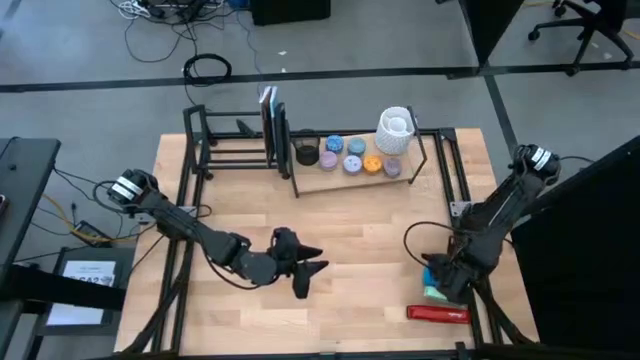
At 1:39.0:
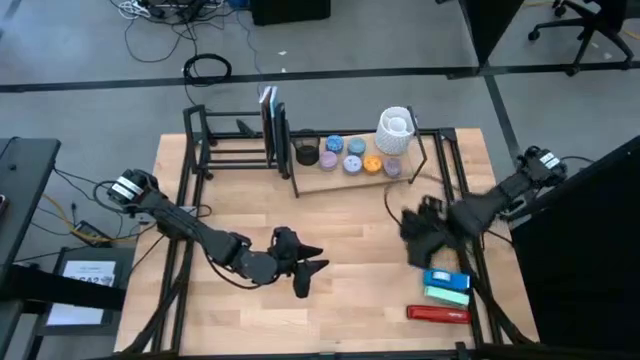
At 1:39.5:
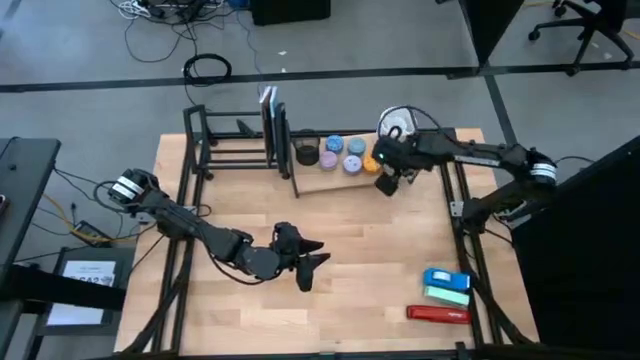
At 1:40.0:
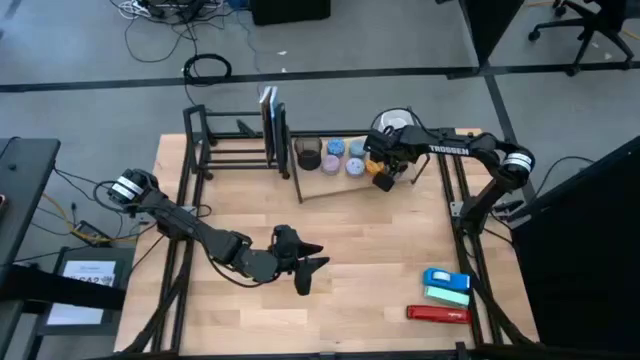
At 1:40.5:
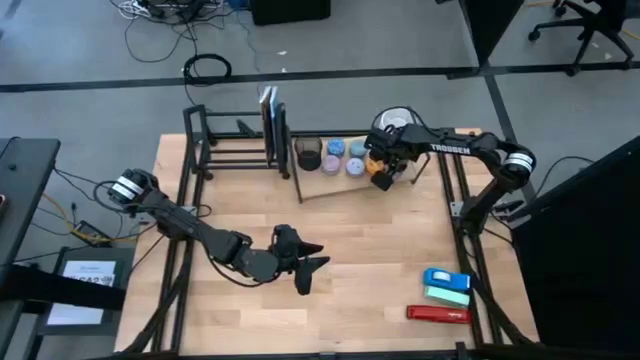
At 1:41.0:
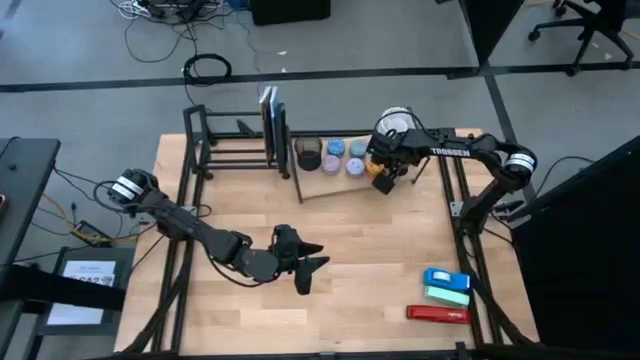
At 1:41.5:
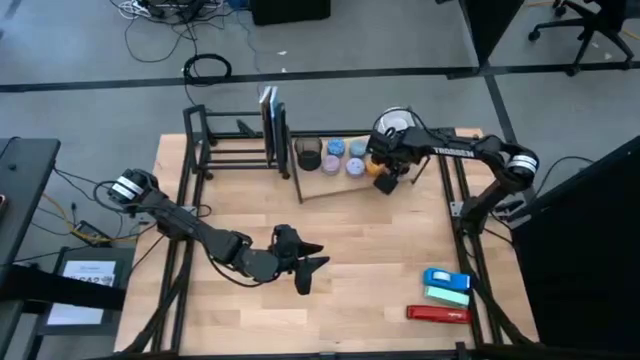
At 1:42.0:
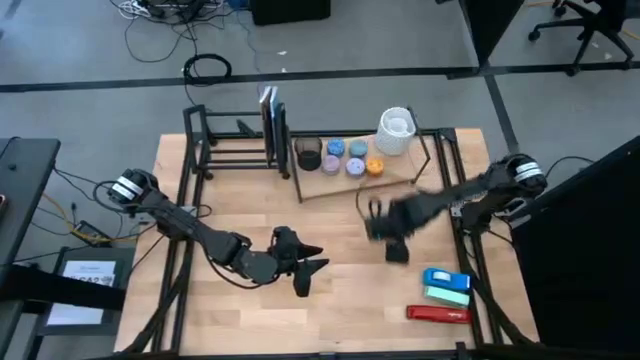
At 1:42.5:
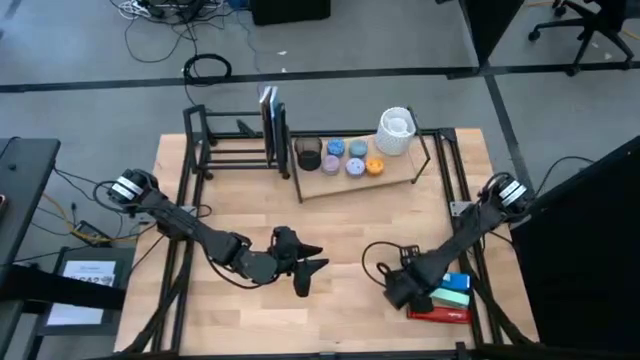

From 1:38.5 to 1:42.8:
Task: Stock shelves
Remove the dark red scented candle from the shelf

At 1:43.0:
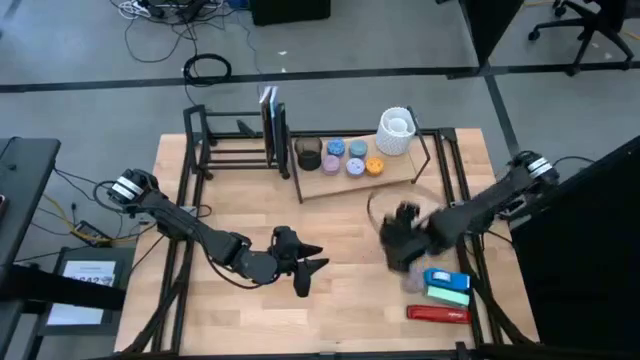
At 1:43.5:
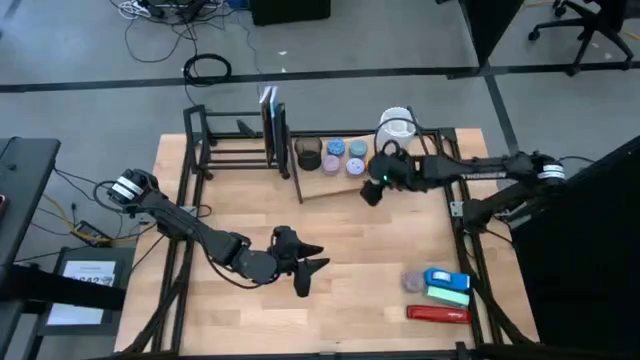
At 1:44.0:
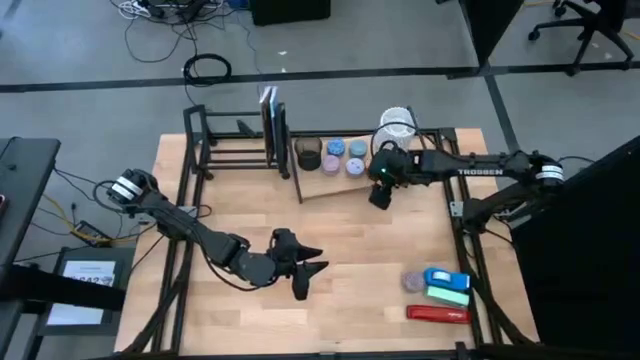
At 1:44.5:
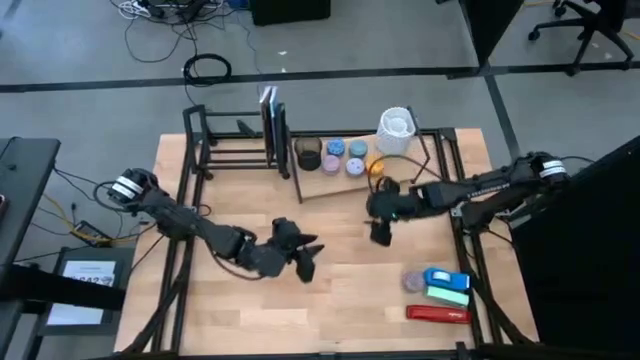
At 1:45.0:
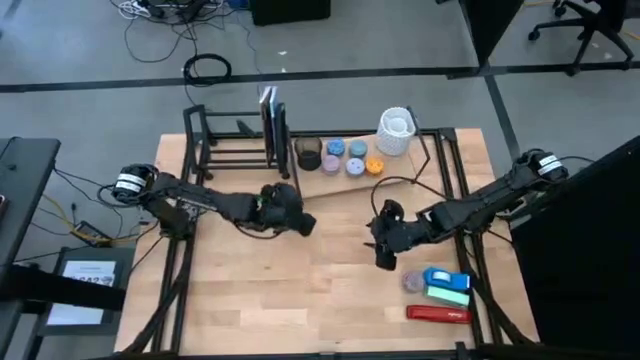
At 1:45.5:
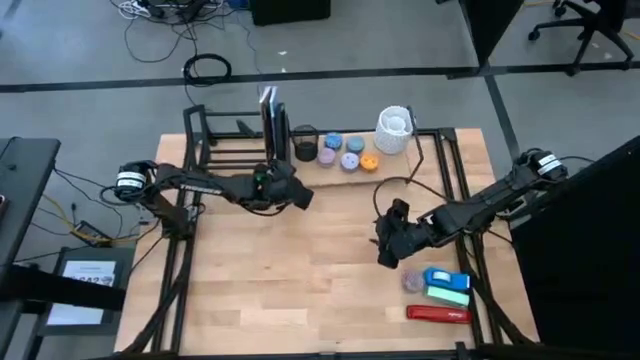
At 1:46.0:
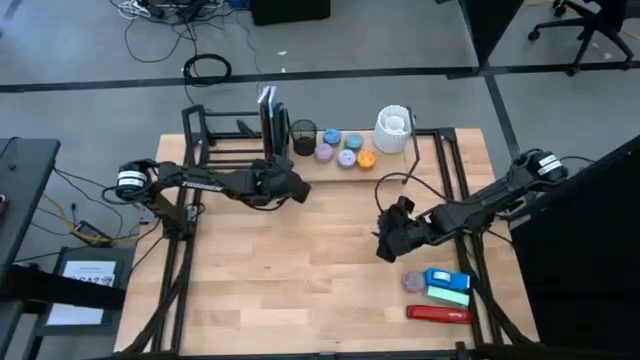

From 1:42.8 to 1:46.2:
Adjust the shelf on the table

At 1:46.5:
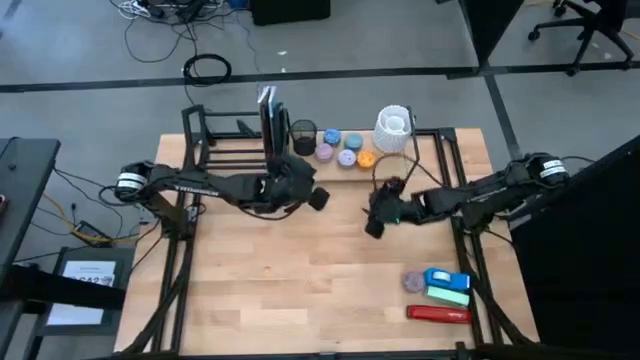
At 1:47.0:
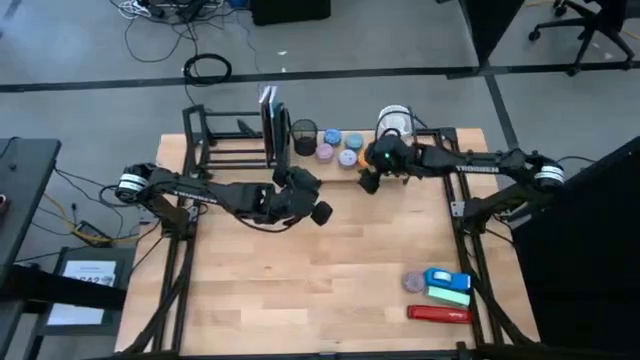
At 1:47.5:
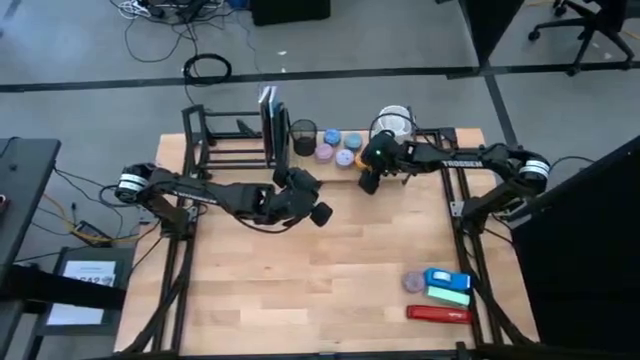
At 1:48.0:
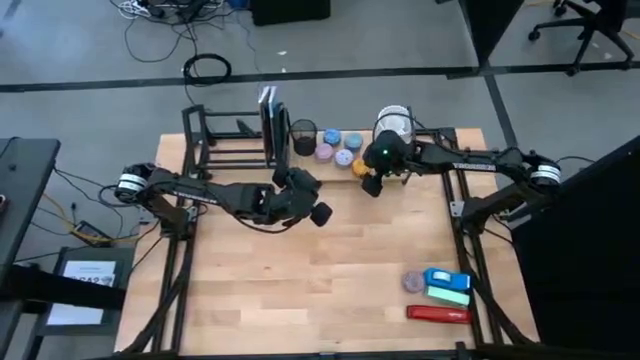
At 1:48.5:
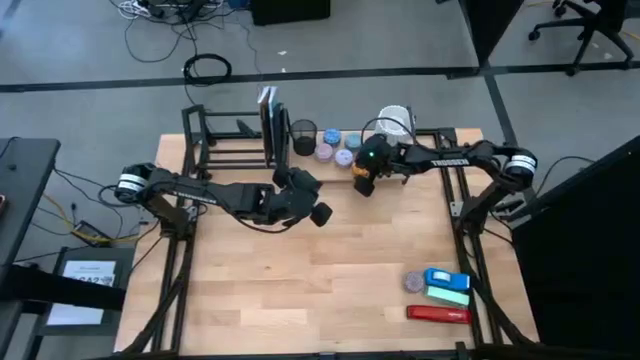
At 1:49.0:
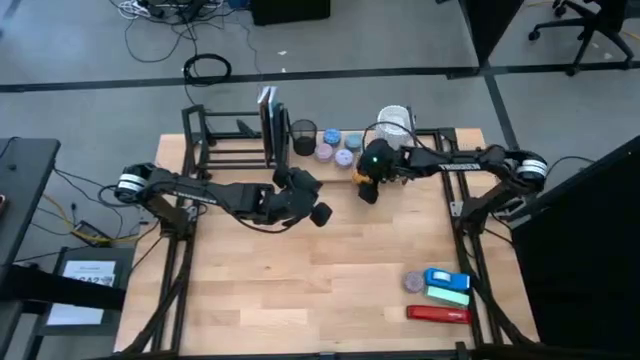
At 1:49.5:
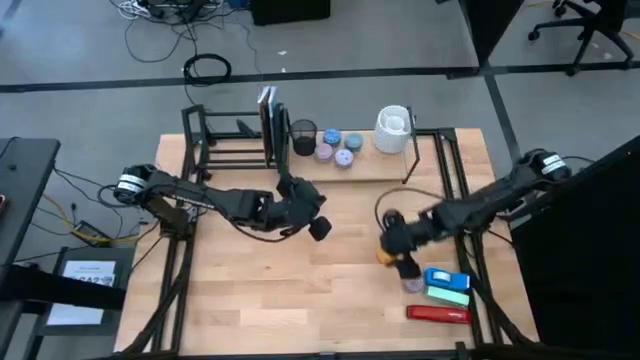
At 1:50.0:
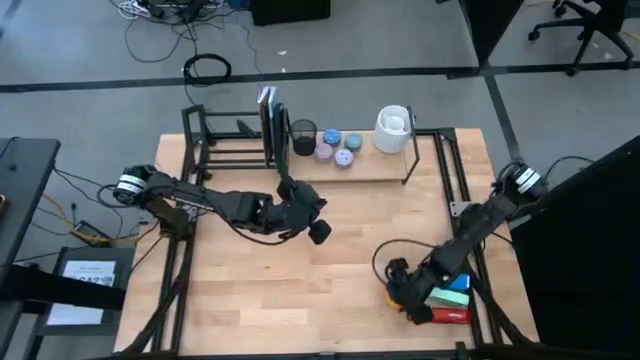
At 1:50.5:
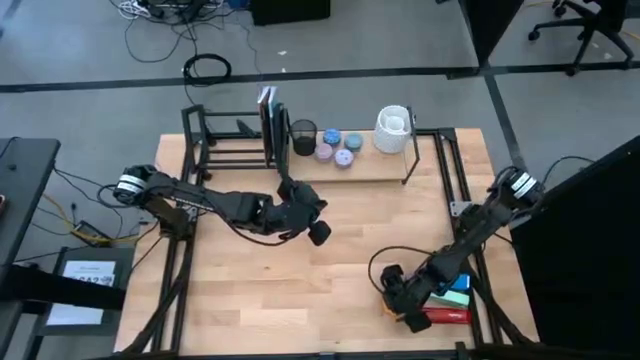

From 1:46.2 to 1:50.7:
Remove the yellow scented candle from the shelf

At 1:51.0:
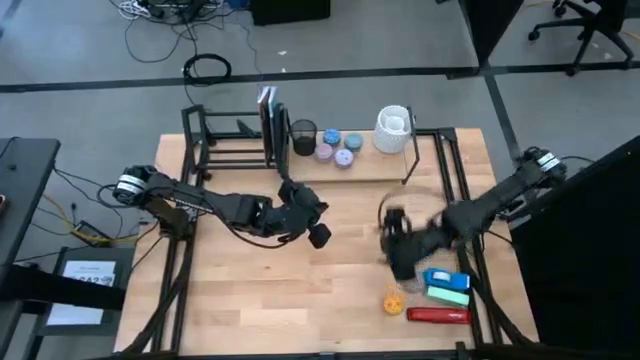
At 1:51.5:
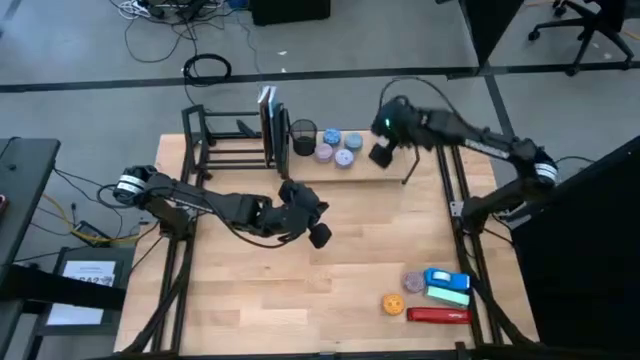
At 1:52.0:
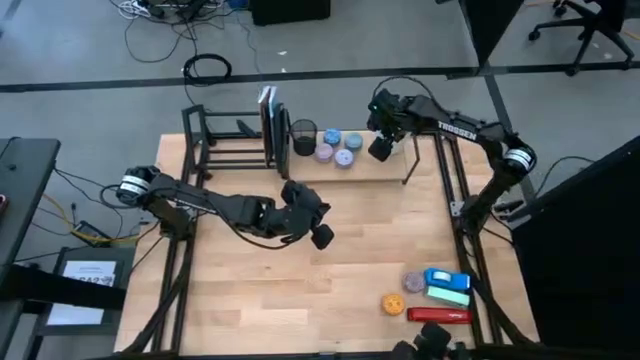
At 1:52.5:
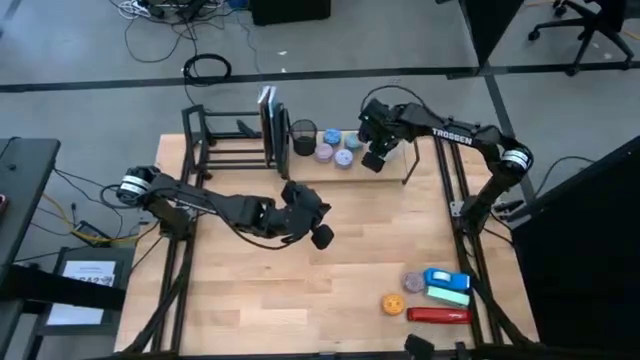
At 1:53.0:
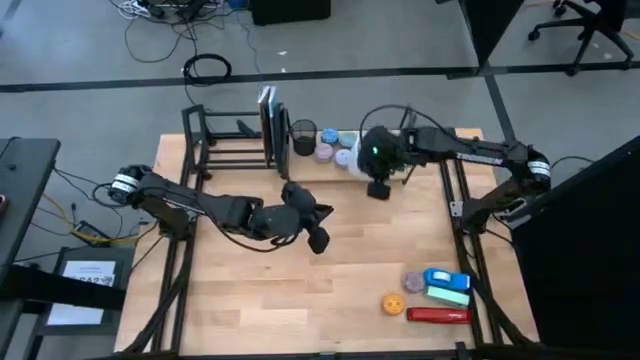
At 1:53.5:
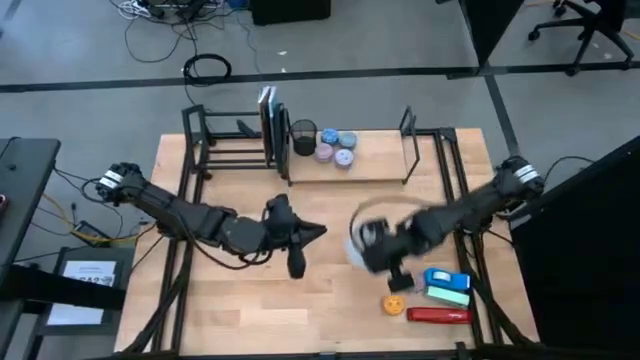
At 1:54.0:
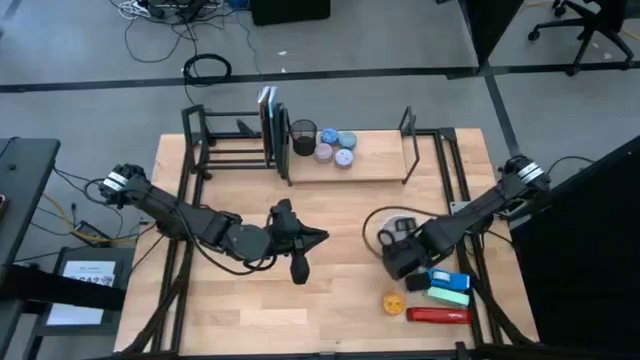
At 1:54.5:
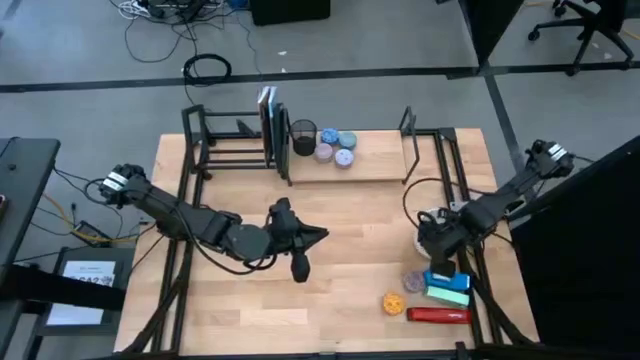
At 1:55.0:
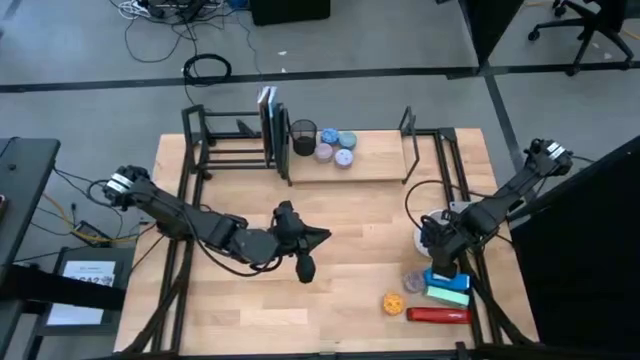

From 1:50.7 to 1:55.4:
Remove the white pen organizer from the shelf

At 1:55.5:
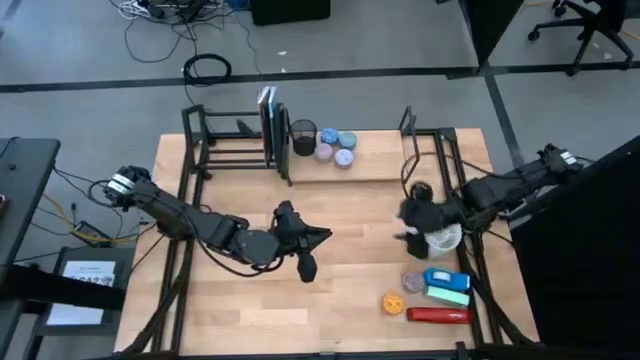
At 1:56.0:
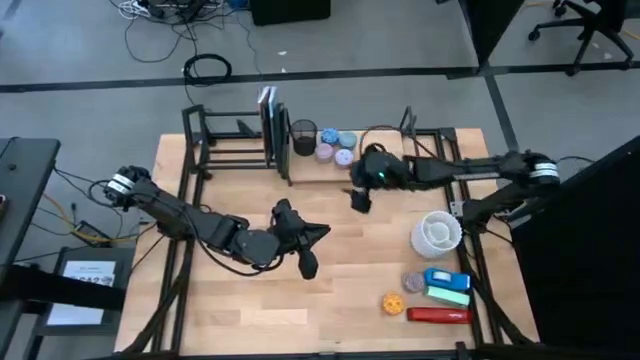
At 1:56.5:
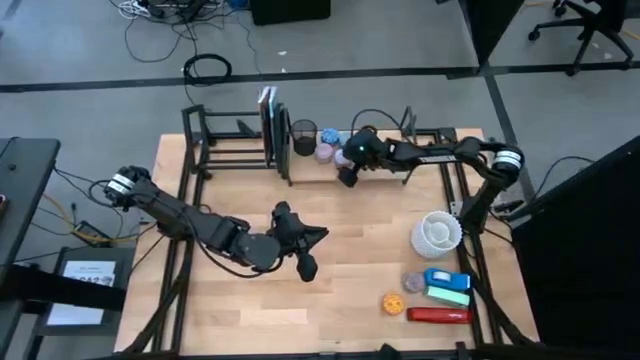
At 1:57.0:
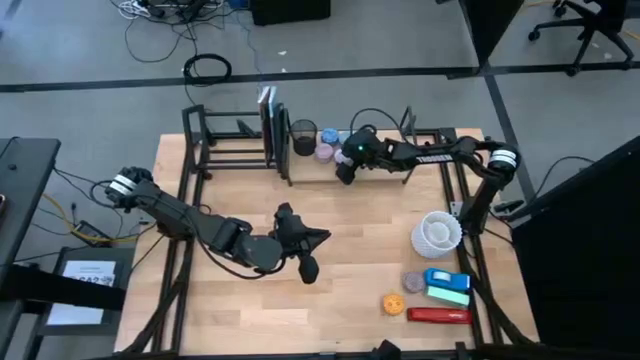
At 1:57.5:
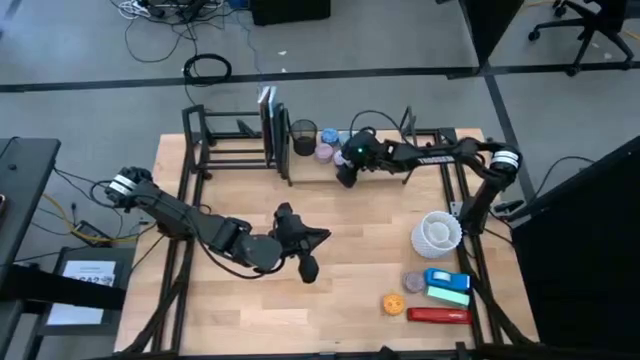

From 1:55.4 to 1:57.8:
Remove the white scented candle from the shelf

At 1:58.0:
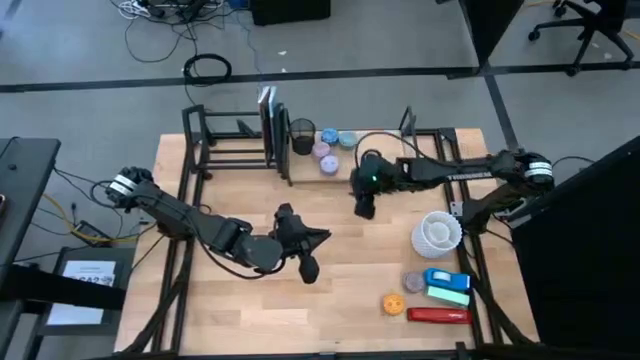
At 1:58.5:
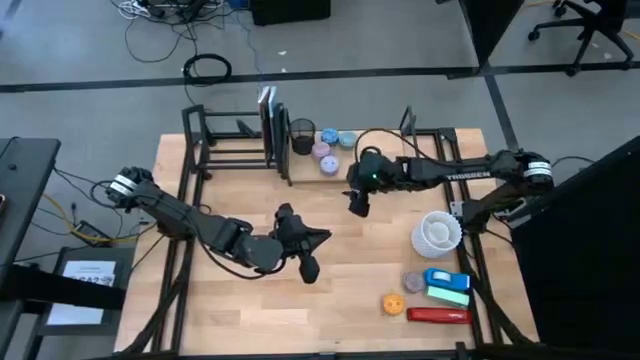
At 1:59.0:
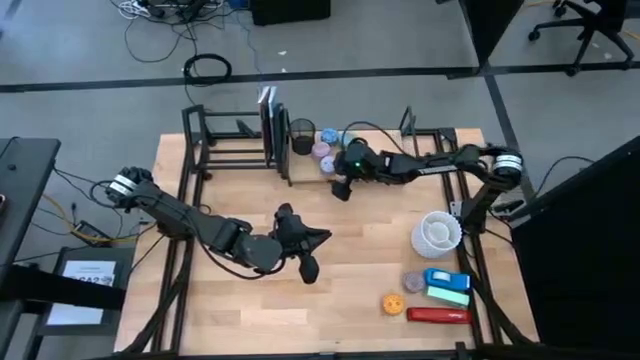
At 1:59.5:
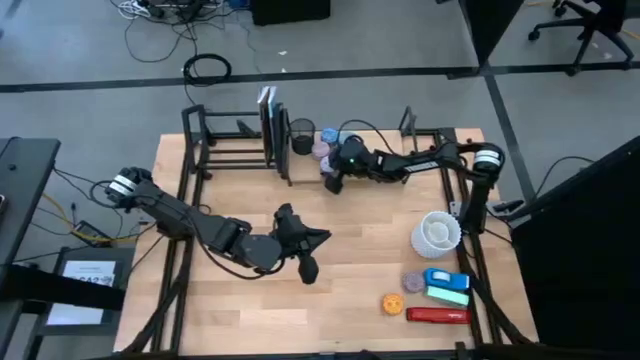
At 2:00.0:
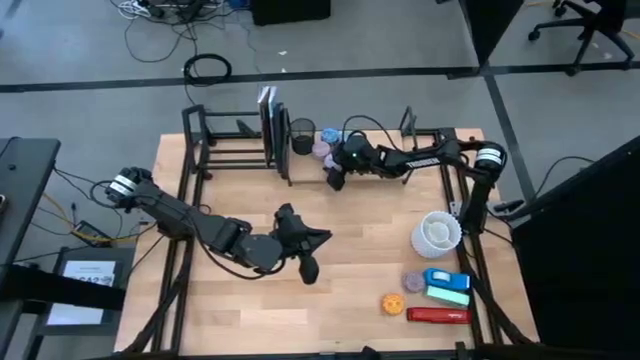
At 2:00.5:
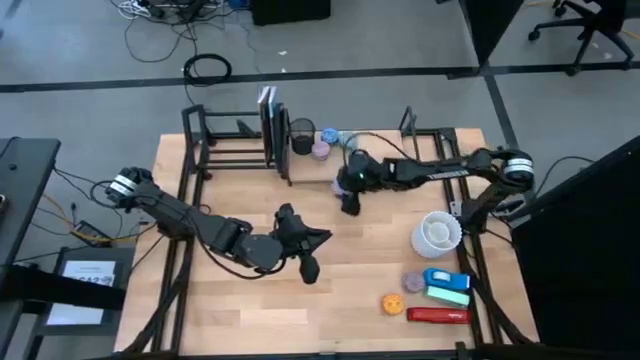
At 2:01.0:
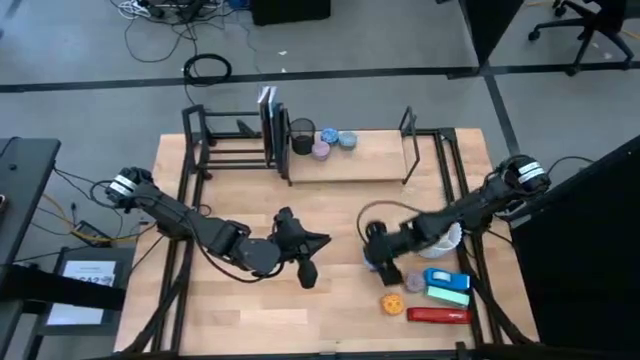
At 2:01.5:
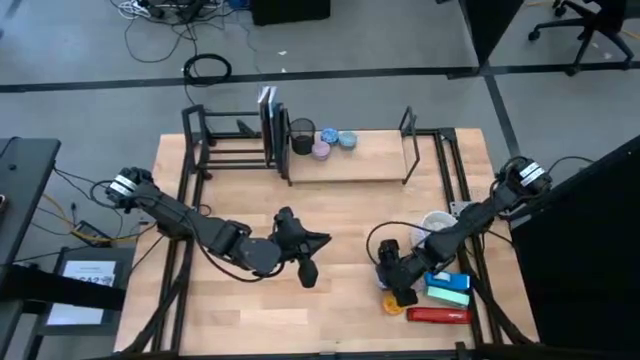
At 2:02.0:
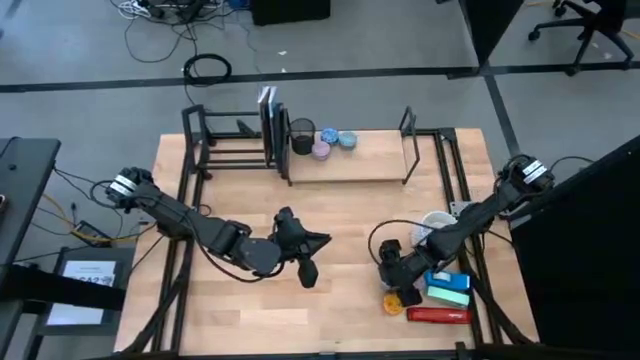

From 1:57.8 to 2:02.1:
Remove the white scented candle from the shelf
